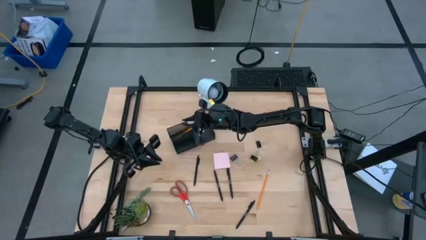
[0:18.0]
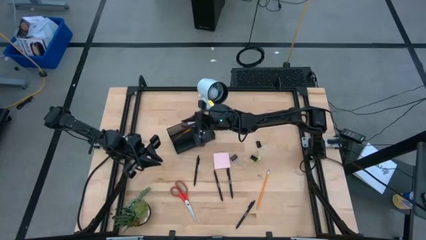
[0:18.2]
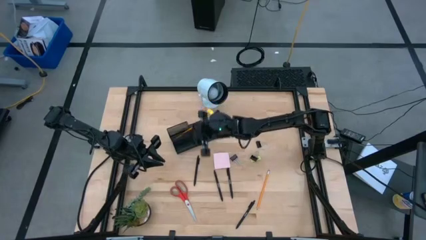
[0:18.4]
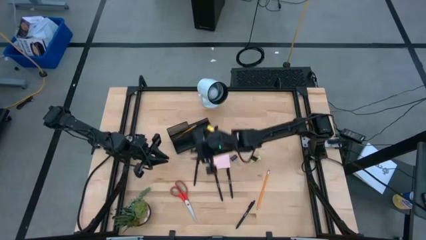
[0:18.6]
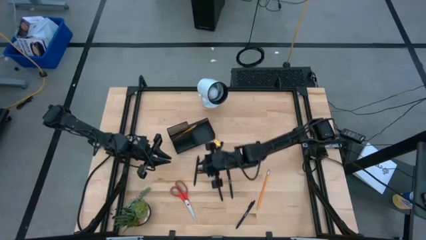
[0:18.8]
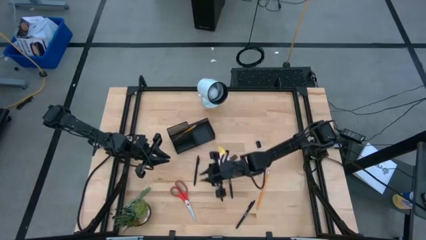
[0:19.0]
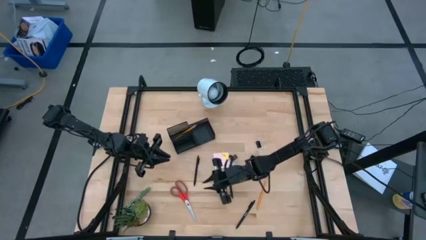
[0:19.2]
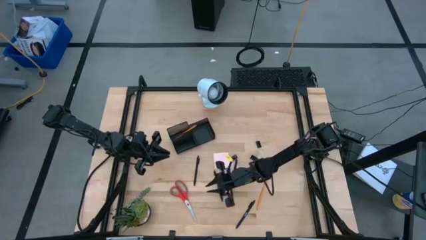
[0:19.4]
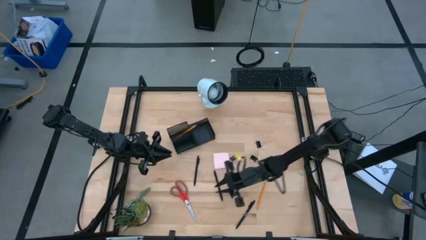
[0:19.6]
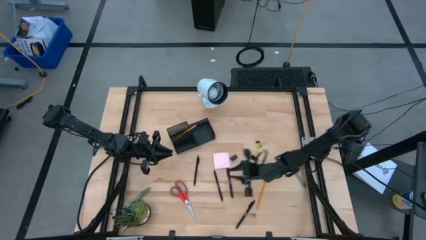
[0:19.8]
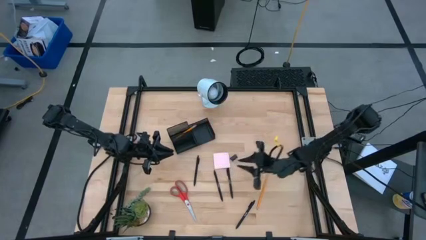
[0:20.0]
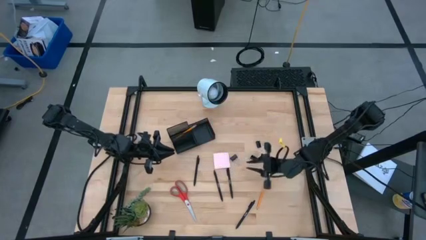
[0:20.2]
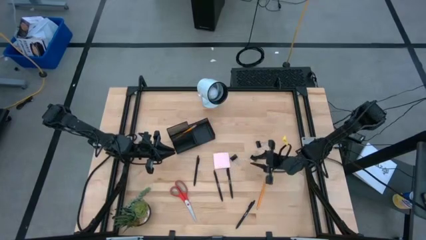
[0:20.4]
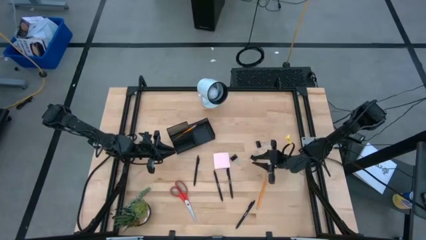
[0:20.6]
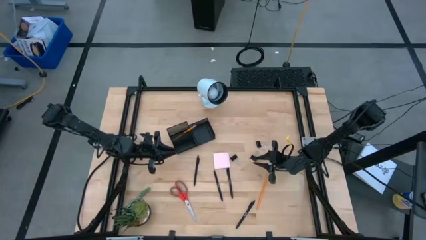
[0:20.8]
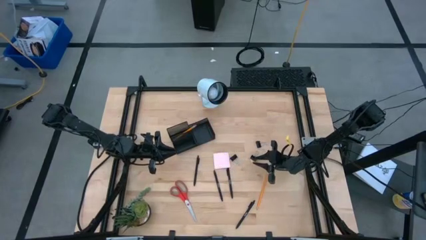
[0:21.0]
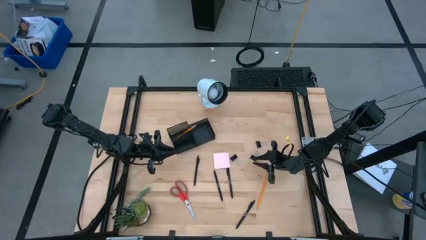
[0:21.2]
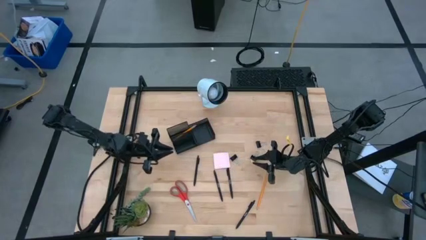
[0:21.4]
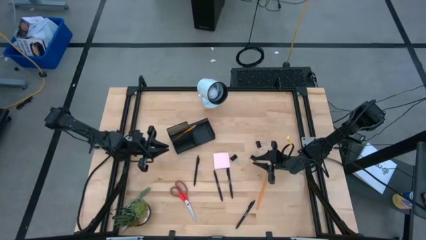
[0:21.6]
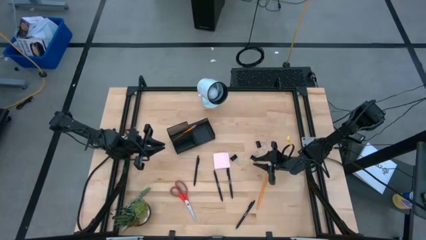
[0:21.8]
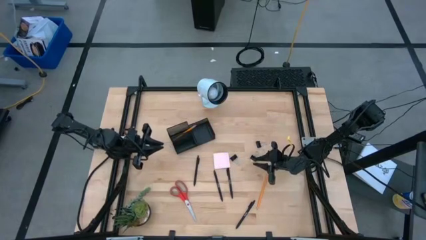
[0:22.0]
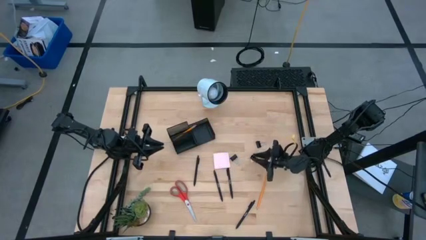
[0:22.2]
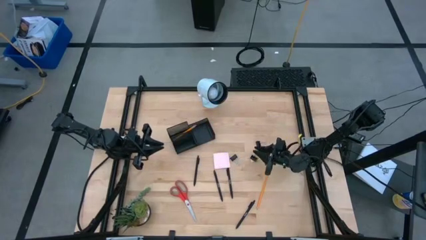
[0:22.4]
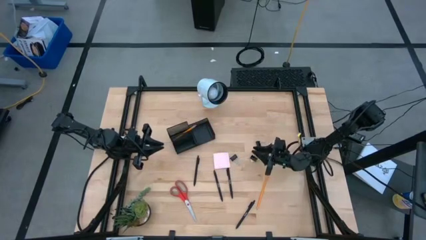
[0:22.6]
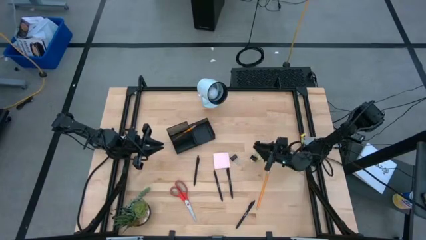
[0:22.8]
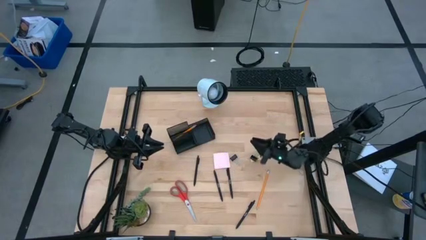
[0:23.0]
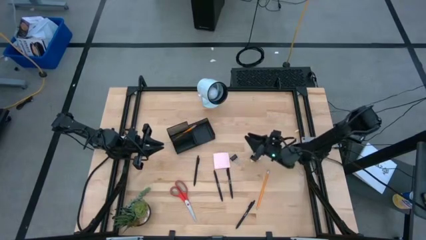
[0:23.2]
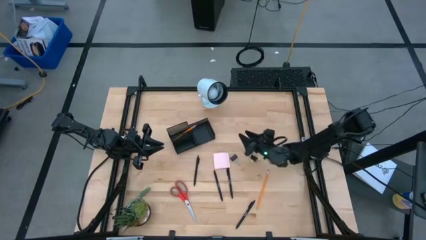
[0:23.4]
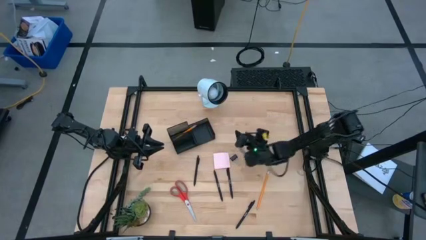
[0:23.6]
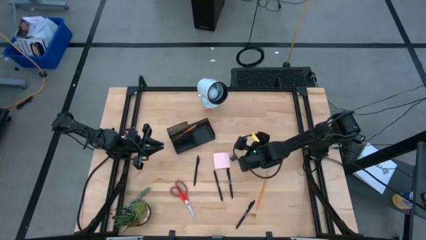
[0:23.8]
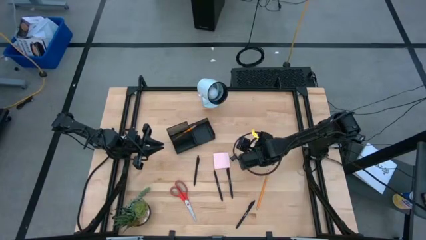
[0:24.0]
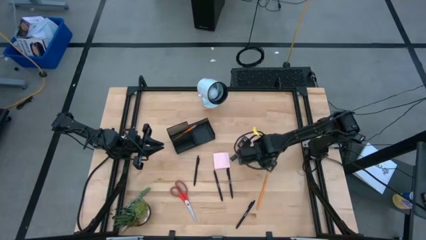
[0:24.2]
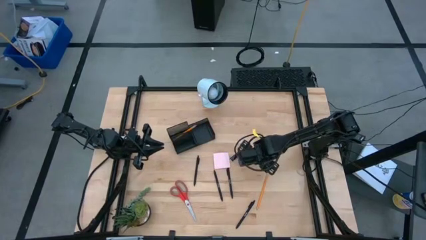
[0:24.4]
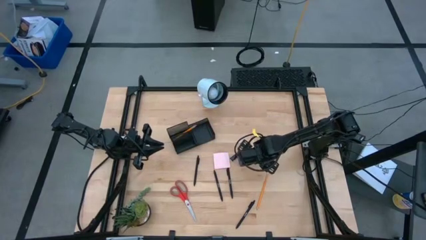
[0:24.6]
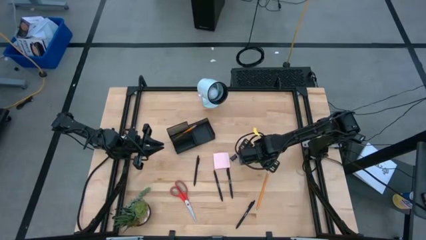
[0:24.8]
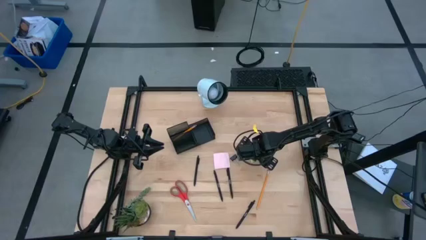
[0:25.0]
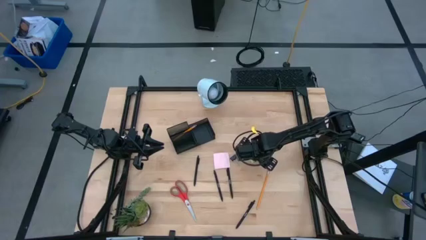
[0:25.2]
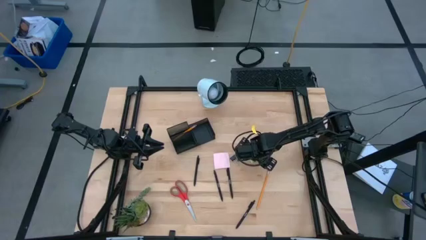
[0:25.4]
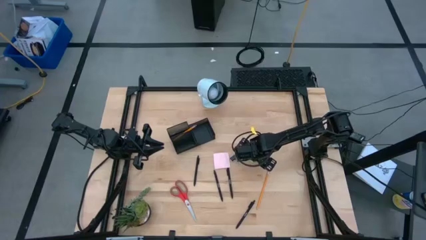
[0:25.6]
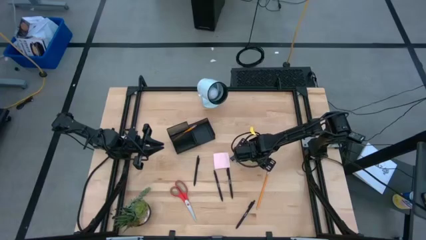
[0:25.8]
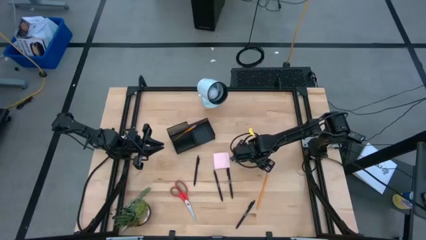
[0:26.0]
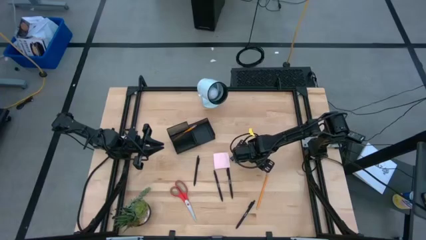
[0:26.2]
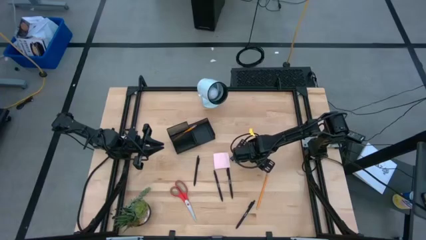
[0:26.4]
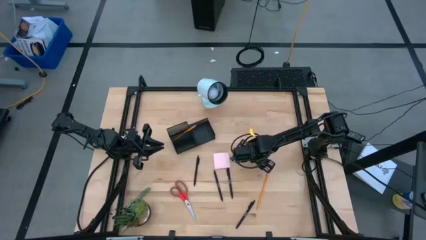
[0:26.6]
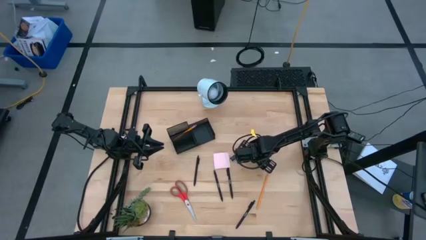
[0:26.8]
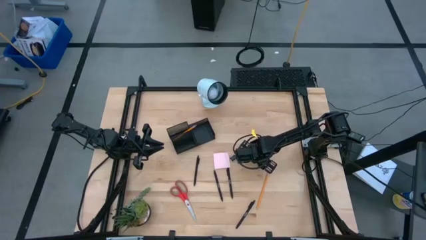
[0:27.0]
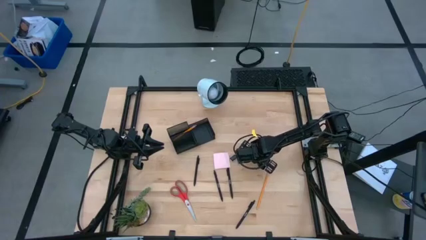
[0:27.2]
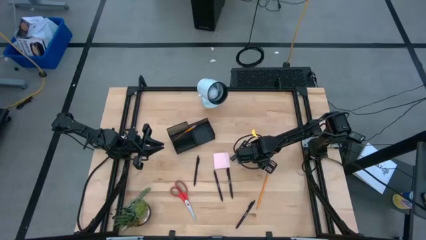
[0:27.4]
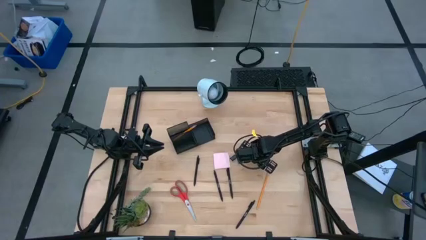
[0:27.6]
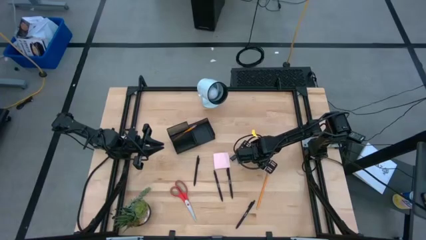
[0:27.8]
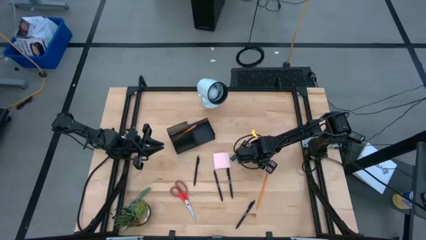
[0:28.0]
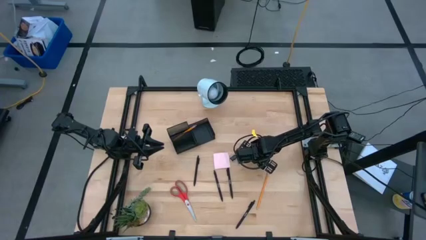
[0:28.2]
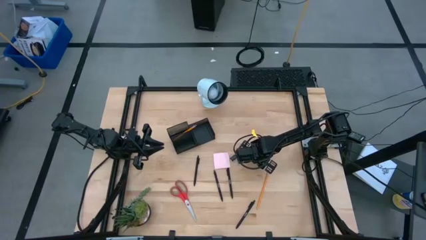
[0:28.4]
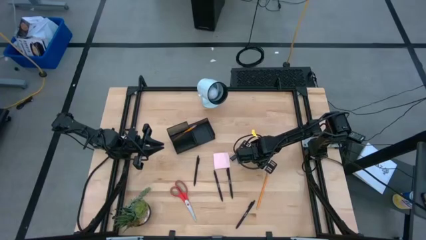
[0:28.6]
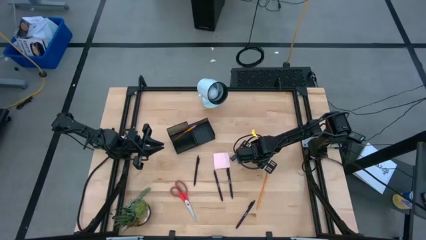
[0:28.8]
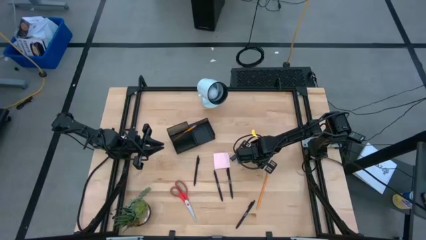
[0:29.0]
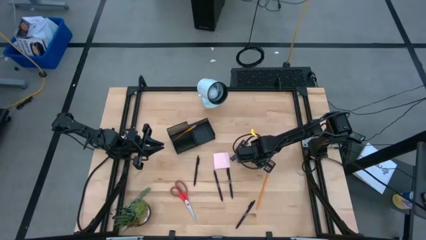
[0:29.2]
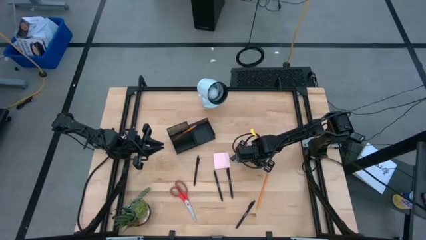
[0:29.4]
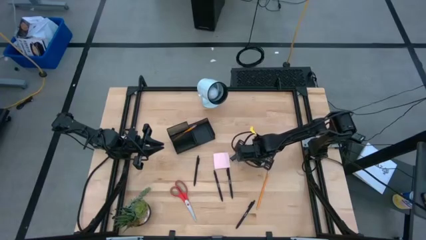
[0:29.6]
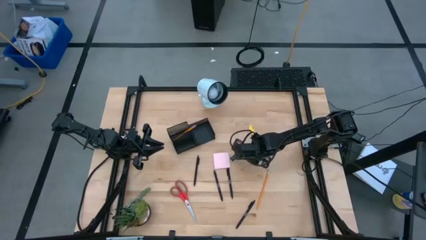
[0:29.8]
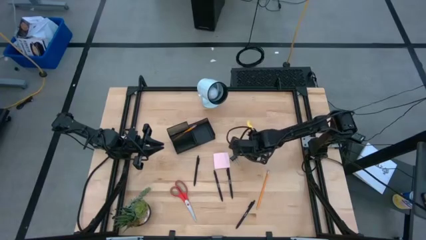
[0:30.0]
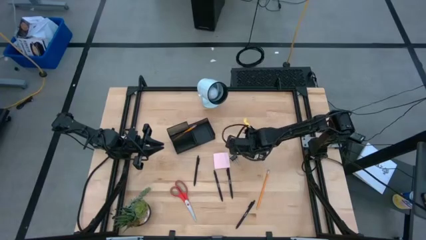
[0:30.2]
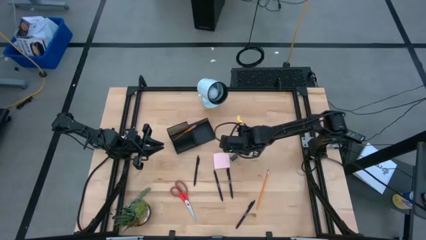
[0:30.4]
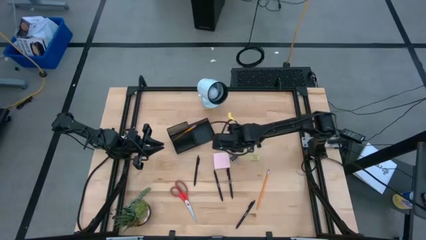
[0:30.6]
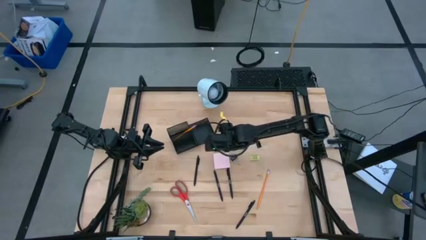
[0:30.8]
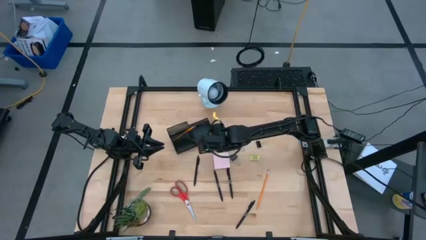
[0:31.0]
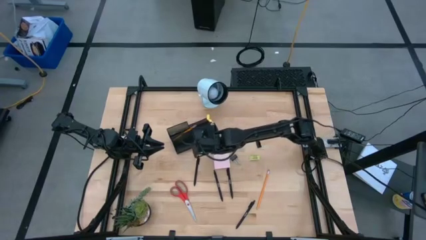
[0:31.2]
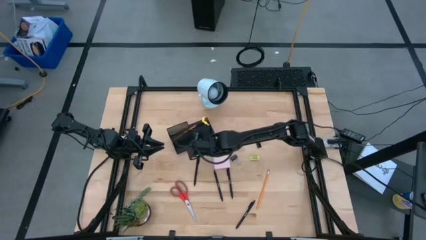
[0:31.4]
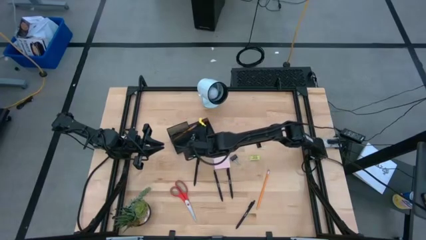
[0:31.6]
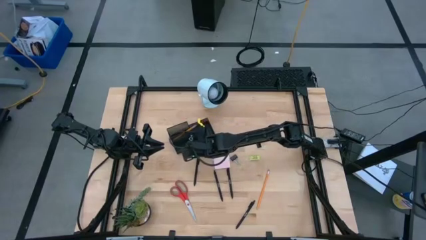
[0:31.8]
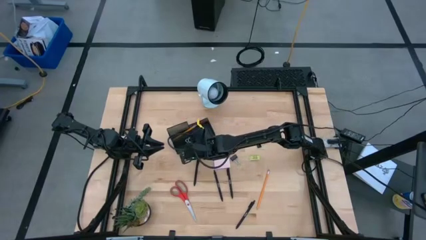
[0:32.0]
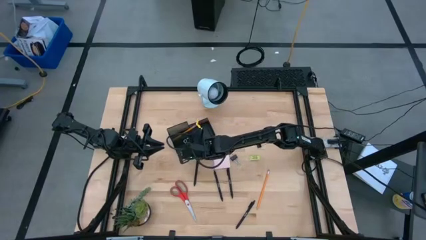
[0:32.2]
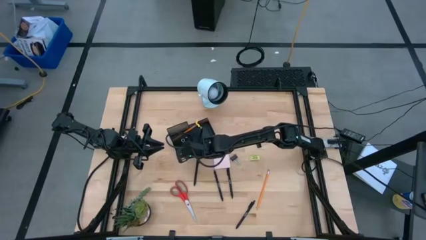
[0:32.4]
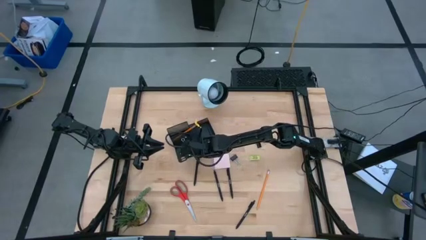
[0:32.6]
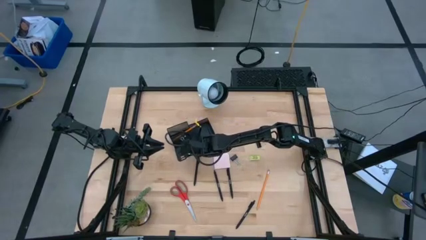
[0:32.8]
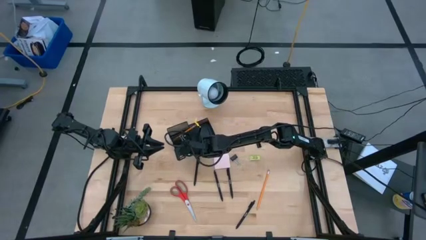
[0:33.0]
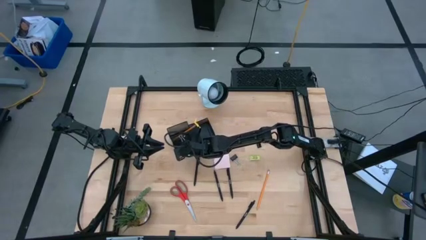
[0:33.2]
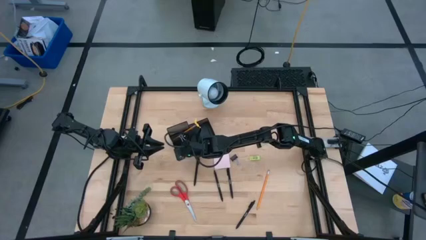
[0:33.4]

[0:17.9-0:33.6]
Task: Pick and place office supplies into organizer
Put the black binder clip into the black desk organizer
